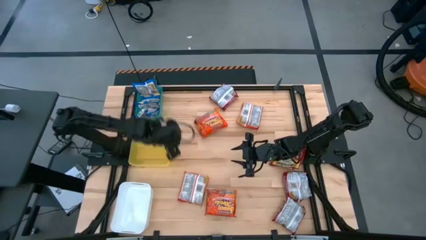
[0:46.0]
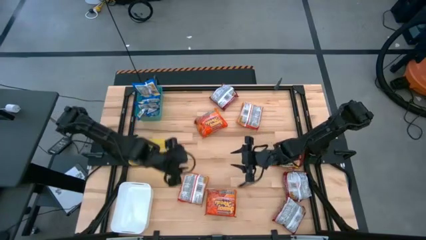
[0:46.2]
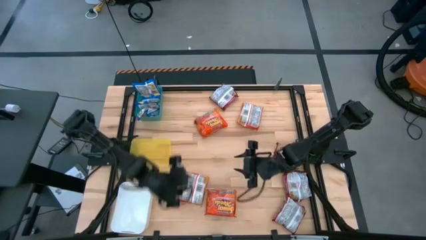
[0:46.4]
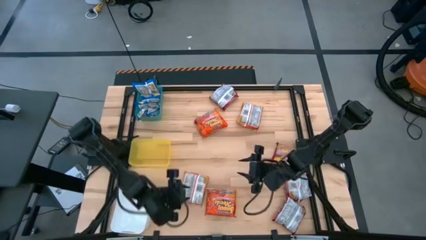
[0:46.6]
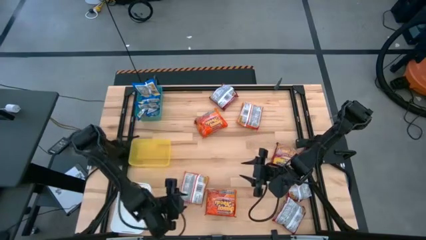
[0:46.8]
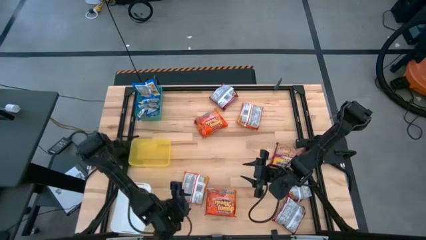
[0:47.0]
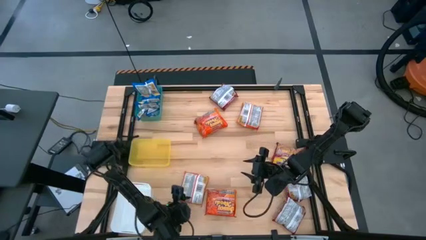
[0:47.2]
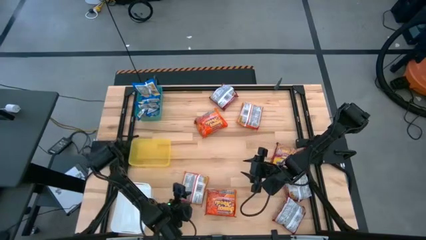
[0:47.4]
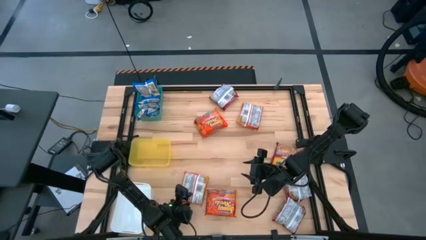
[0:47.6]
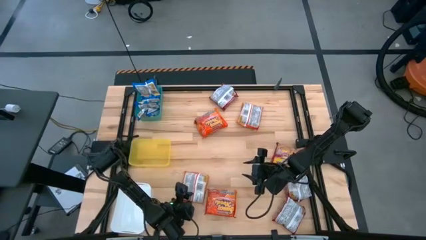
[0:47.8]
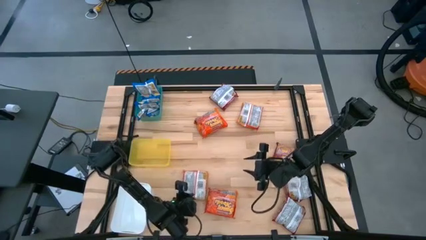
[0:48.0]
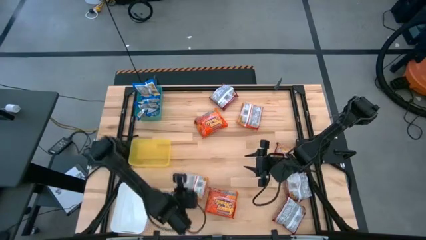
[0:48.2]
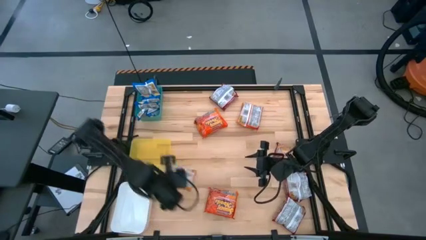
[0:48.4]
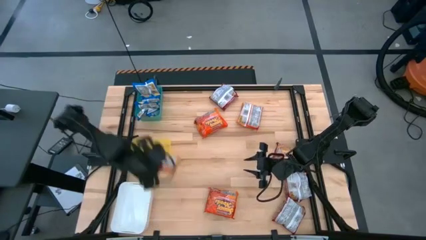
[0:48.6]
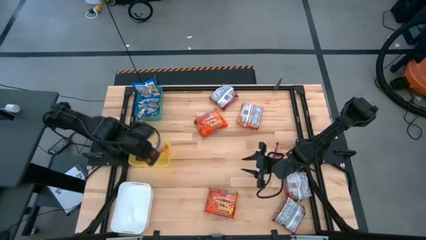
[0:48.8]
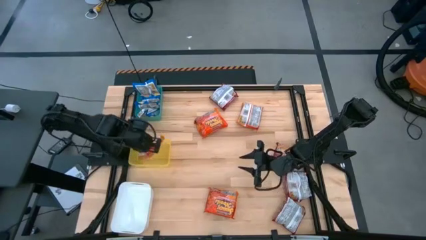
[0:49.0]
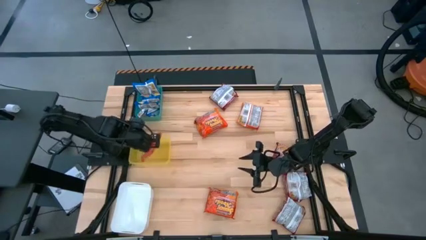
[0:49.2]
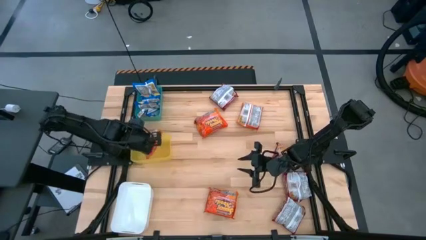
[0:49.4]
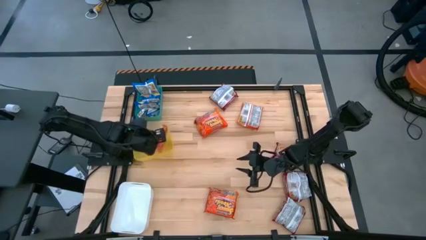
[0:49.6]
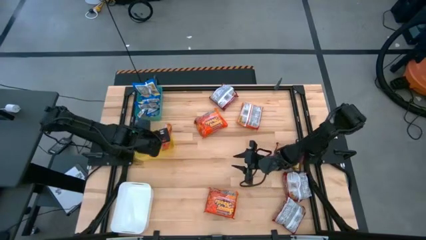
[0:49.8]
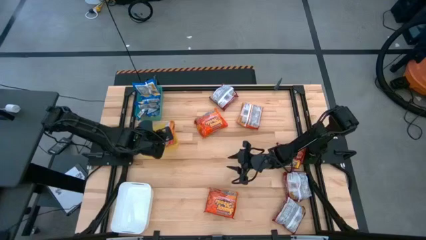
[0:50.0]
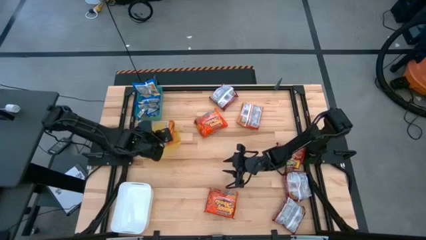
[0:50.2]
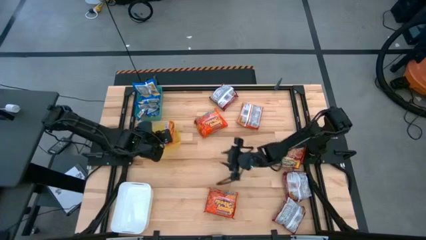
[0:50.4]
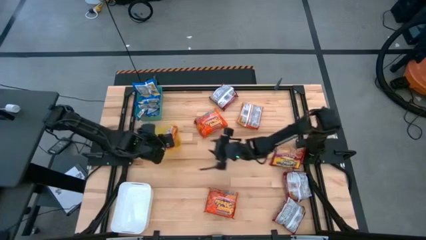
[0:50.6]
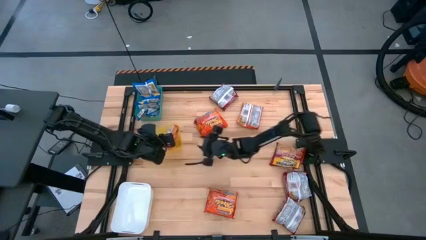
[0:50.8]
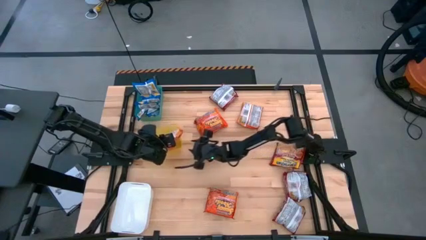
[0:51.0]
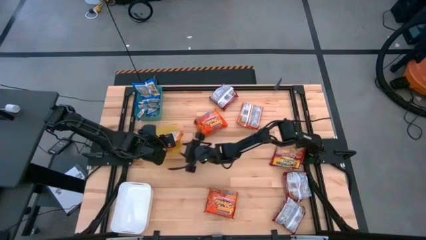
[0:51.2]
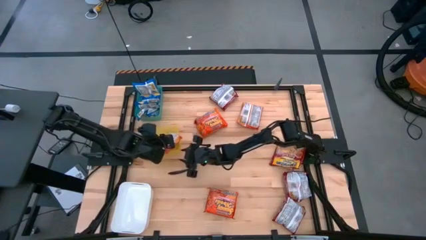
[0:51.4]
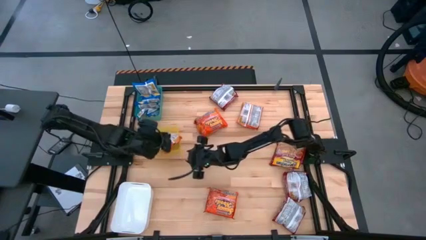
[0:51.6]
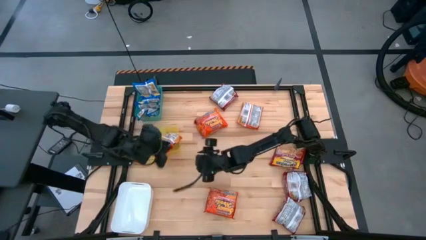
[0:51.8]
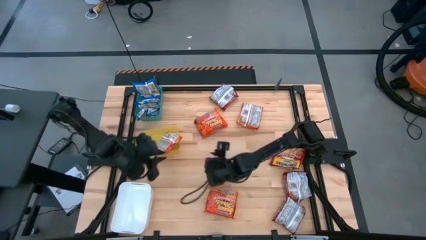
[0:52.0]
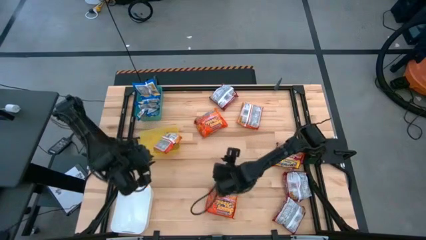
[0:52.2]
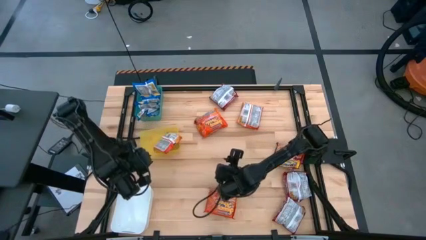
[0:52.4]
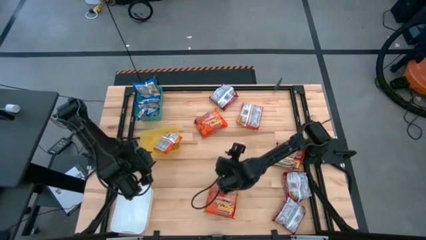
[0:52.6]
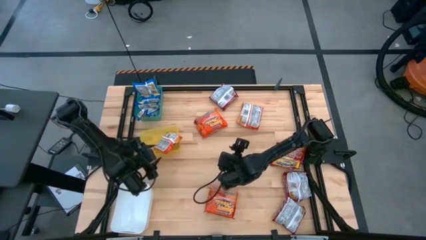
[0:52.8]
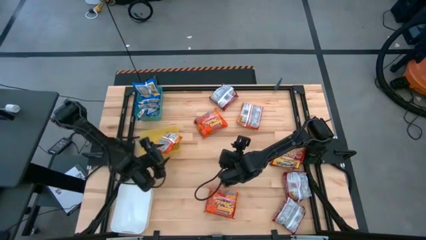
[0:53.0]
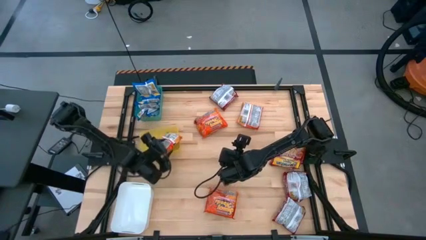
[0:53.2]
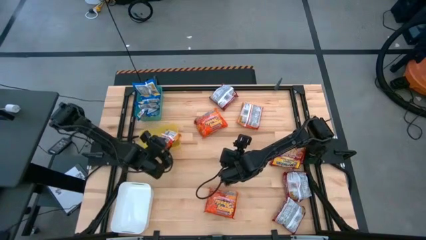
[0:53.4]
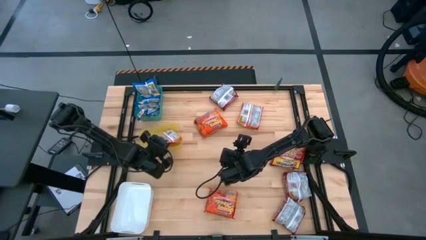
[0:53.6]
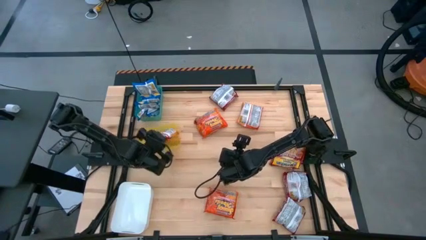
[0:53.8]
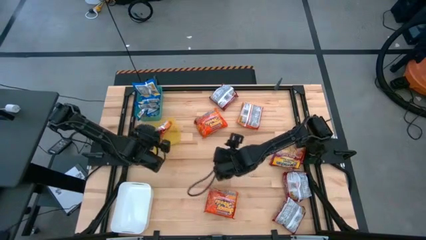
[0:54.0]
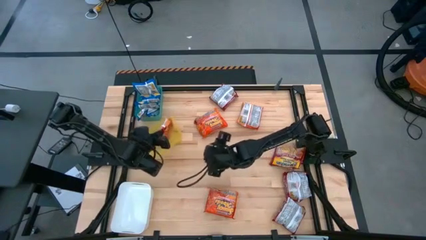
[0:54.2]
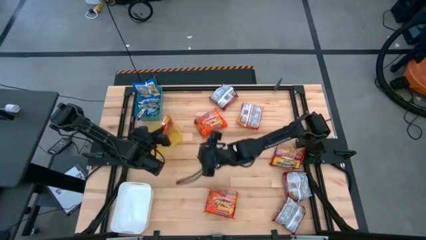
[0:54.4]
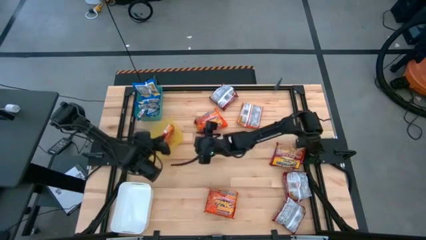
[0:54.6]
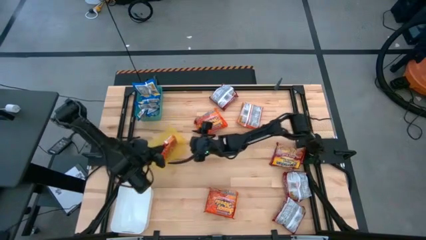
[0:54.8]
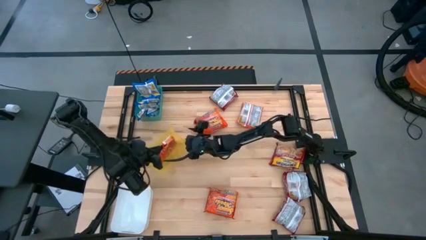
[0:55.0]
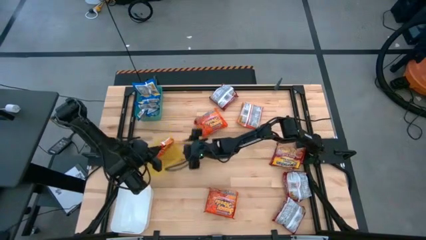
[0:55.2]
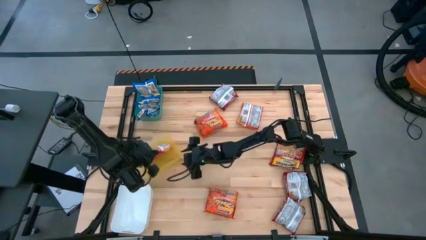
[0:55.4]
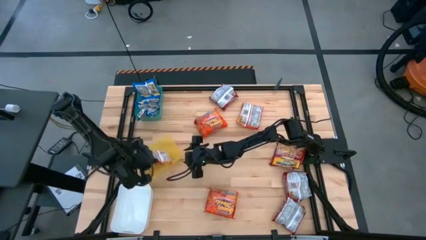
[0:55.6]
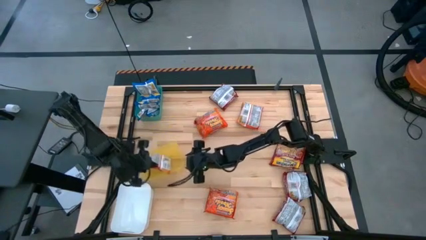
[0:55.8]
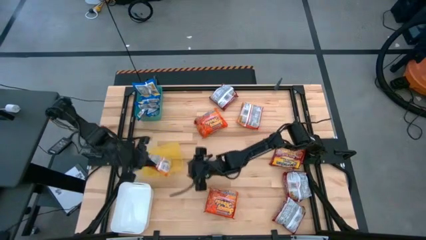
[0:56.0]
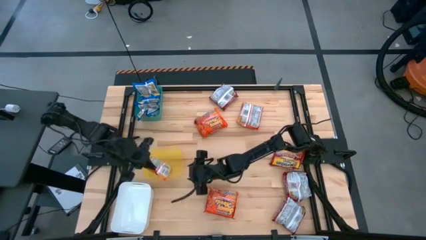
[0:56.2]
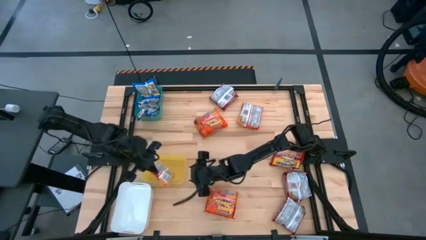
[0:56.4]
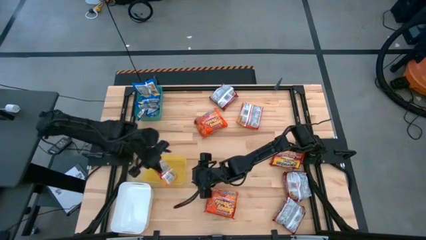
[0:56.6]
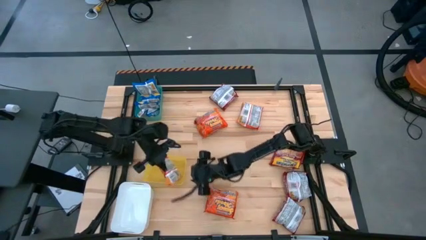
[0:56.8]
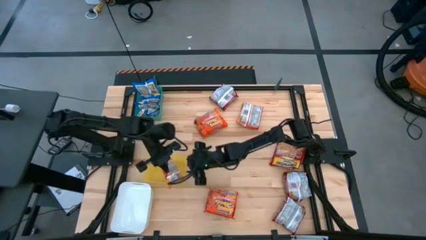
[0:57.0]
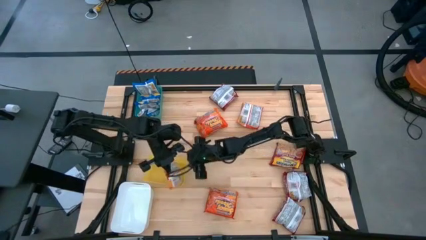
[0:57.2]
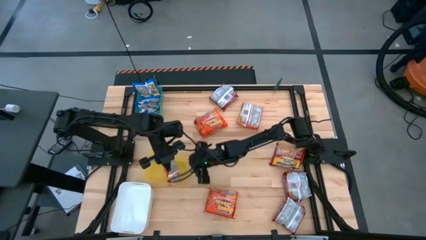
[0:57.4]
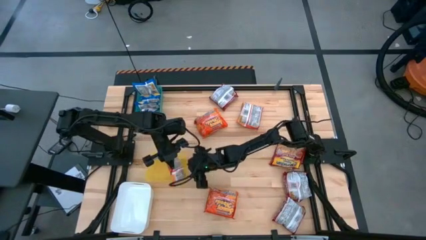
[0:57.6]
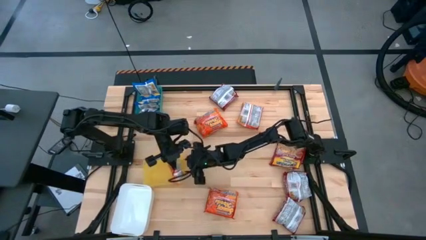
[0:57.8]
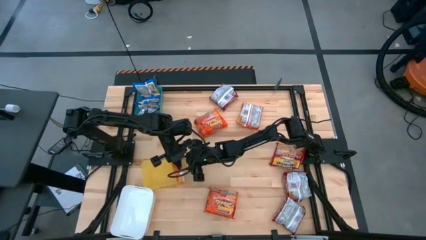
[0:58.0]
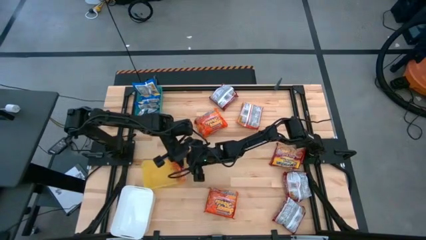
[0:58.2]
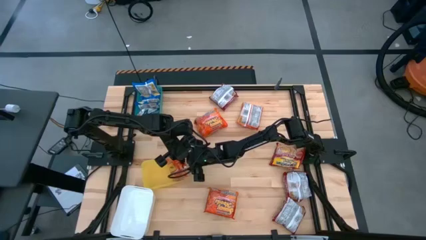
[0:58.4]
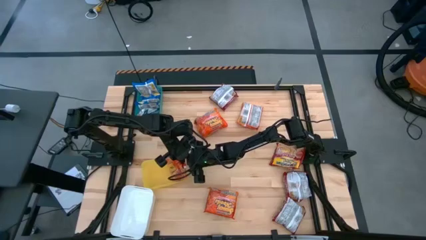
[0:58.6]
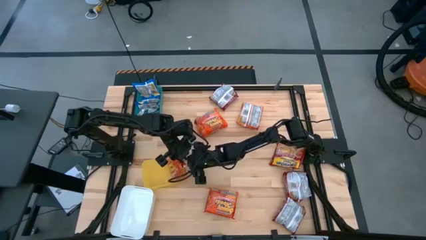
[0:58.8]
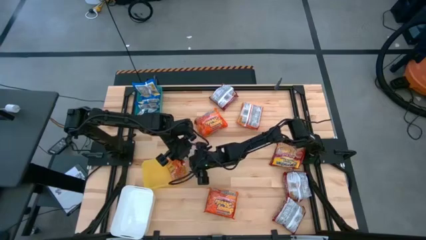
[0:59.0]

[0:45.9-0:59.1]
Task: Sort Maruchan noodles
Put the orange noodle pack into the yellow bin

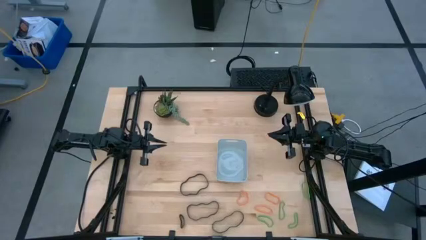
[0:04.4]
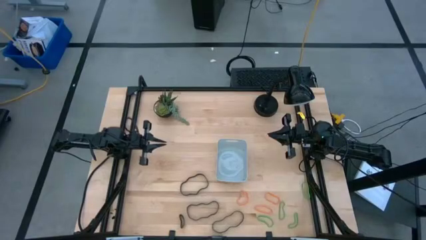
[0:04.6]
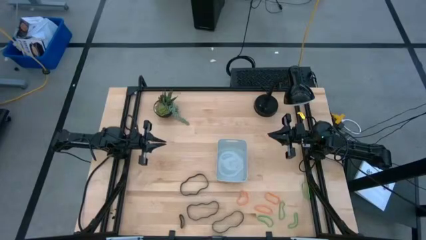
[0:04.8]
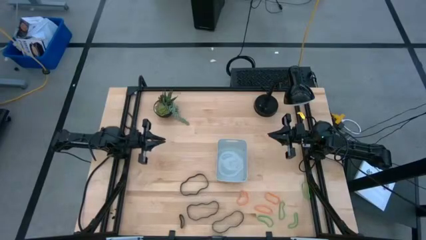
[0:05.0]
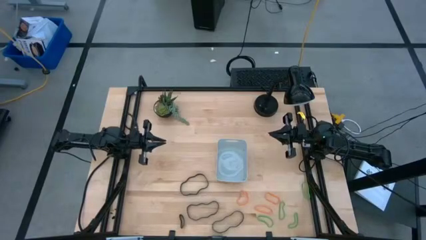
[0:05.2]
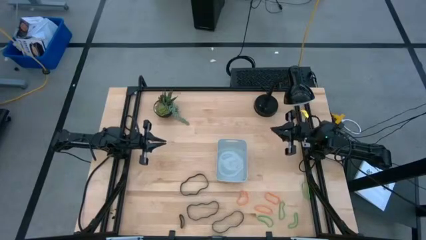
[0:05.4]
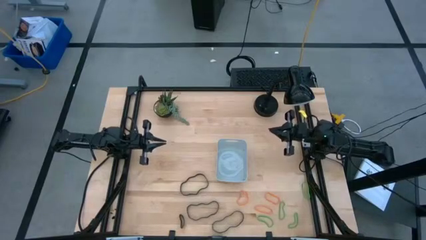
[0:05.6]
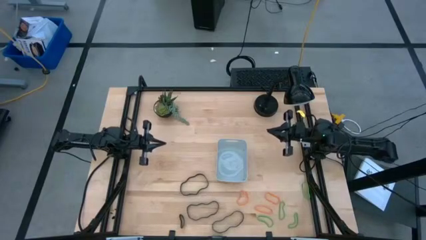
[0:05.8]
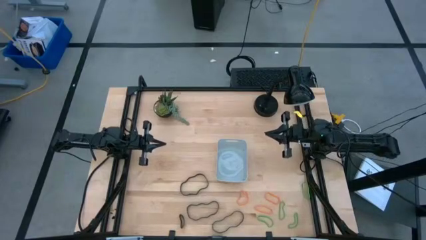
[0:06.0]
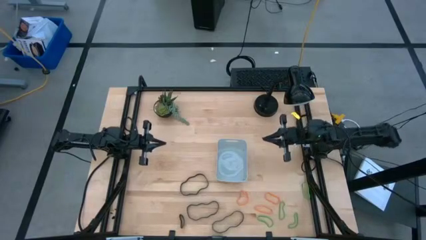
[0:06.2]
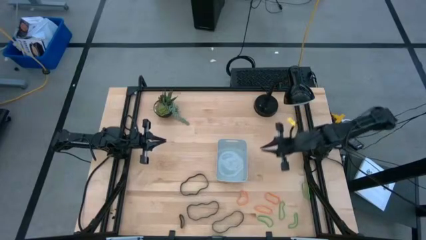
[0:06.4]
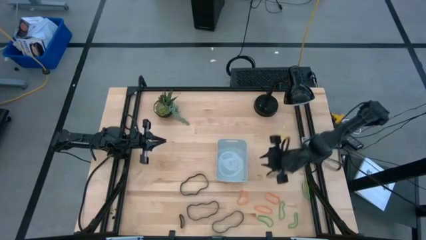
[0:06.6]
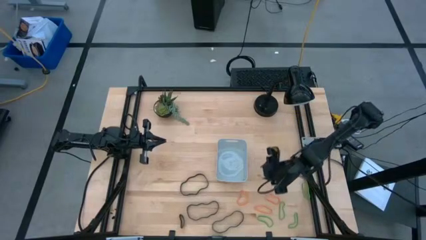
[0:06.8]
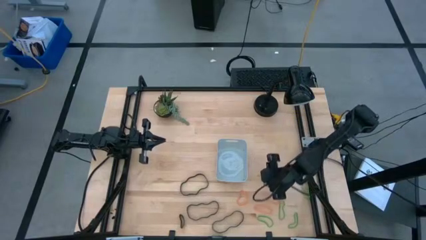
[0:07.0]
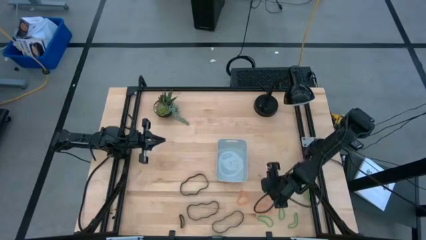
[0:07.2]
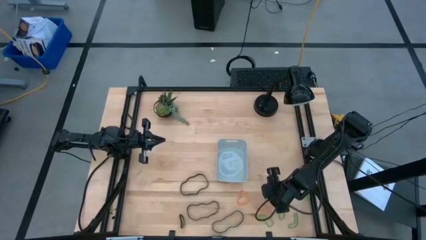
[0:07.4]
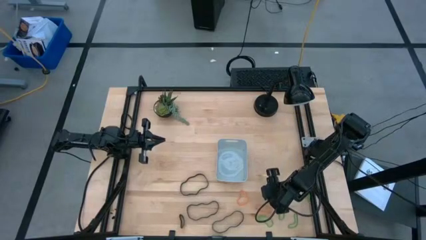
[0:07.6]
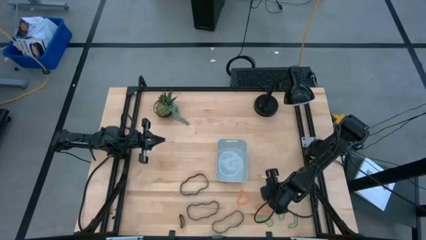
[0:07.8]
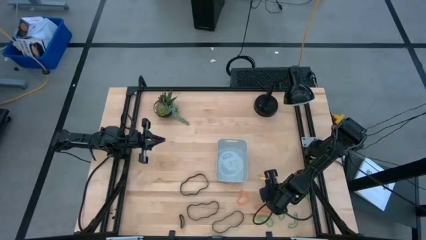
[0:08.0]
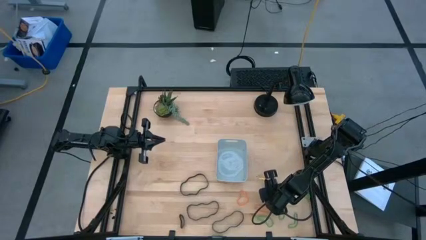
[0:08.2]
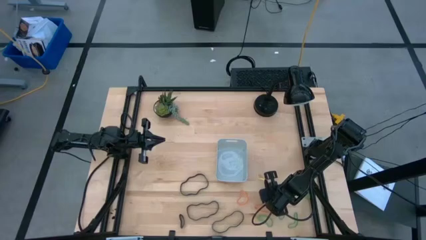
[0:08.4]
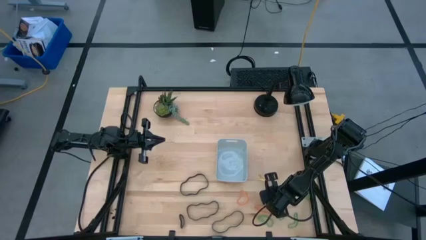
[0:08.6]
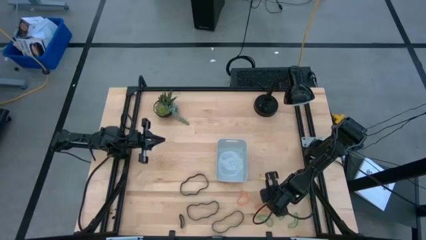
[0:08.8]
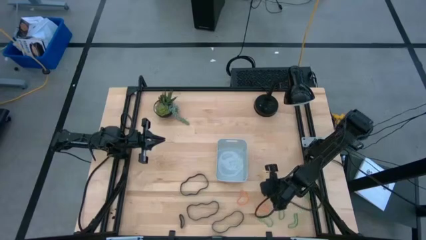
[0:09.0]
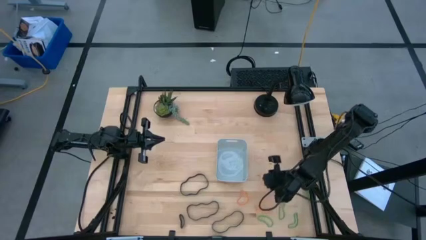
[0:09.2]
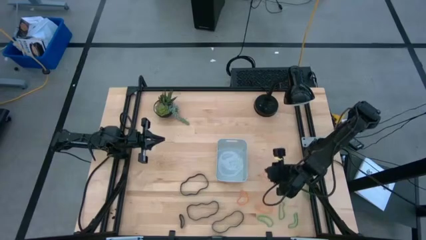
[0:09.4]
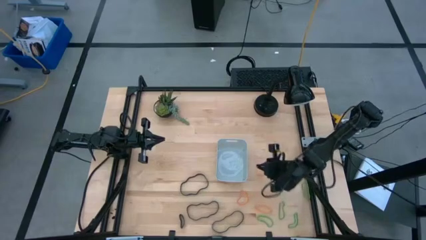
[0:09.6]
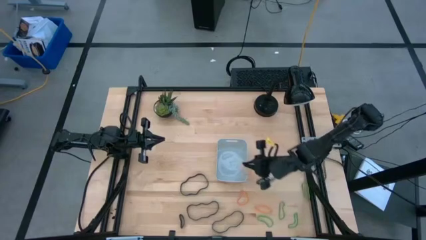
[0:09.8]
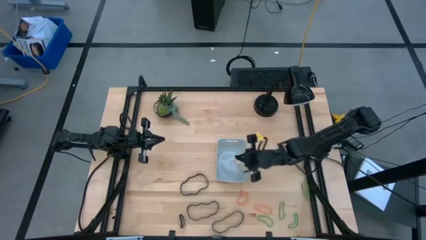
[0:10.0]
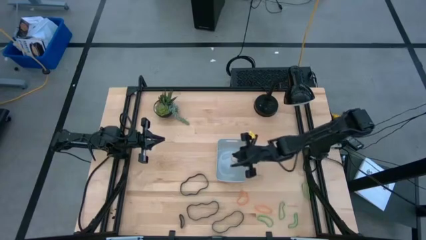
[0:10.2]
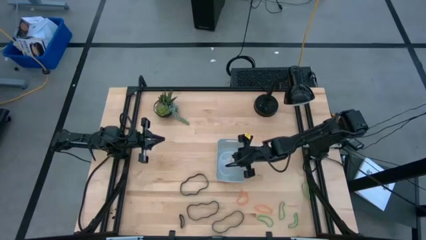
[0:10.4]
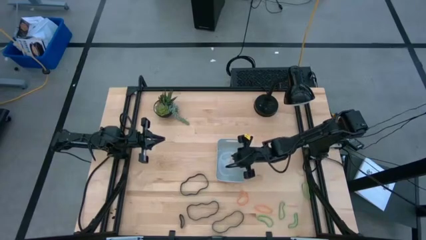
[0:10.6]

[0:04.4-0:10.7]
Task: Pick and place rubber bands into bin
Put the orange rubber band into the white bin
